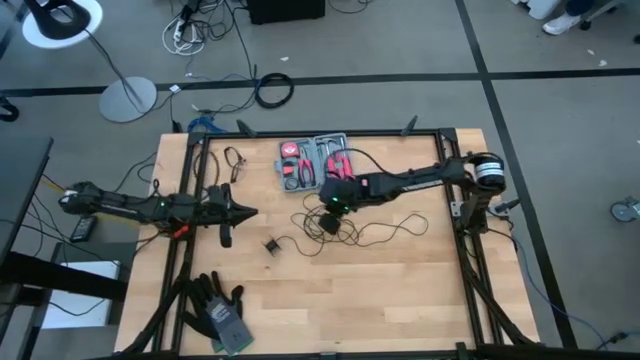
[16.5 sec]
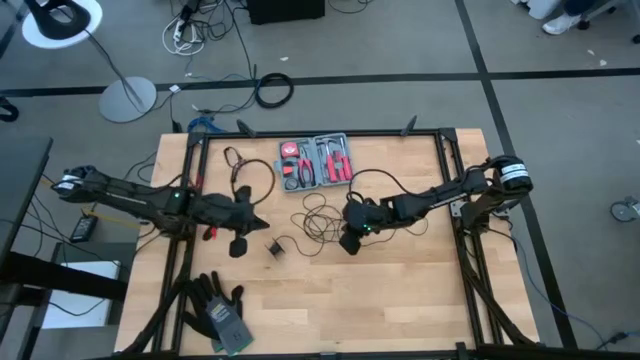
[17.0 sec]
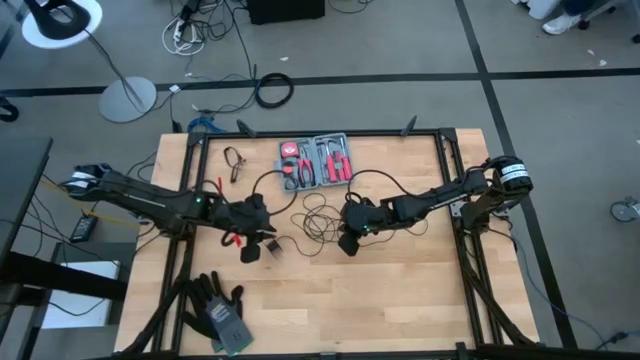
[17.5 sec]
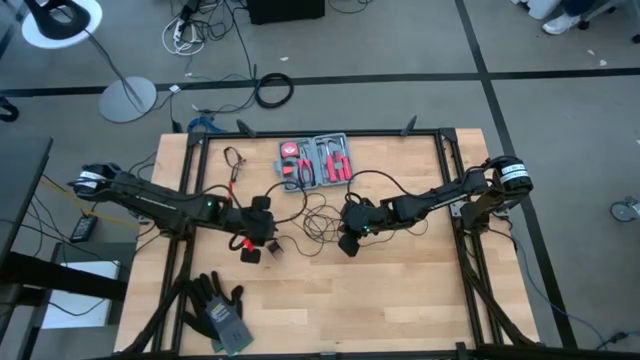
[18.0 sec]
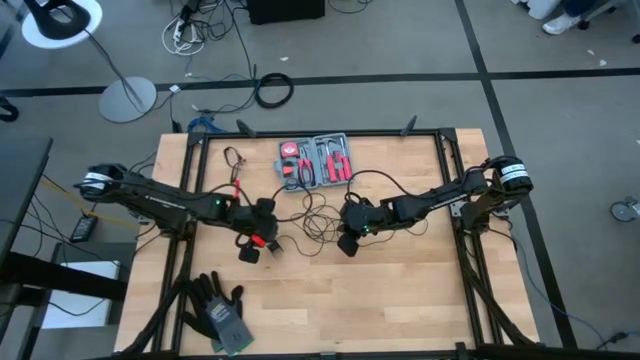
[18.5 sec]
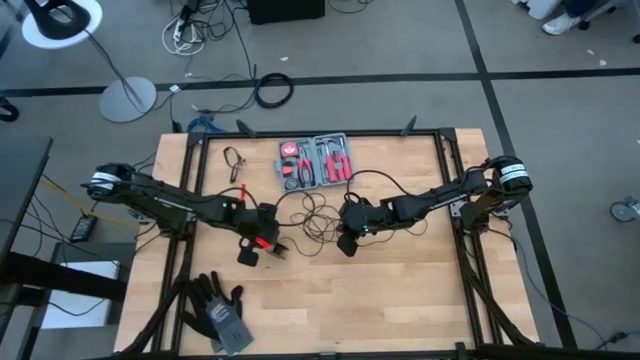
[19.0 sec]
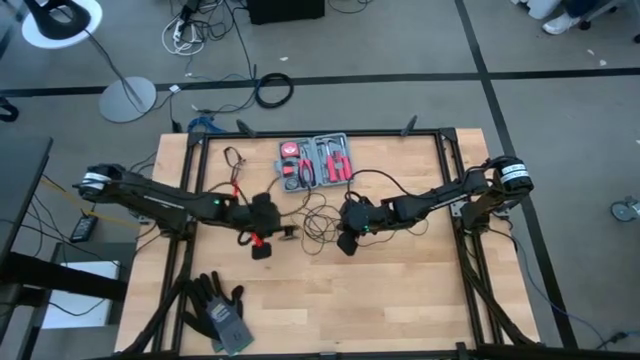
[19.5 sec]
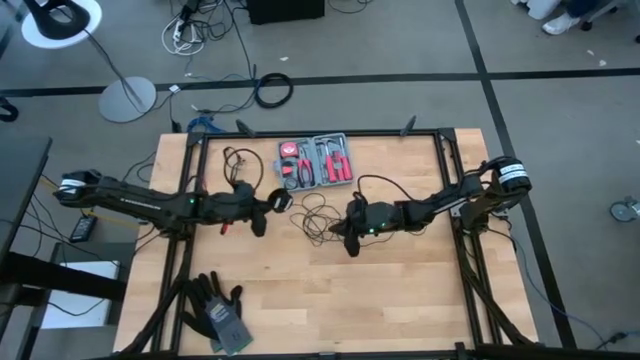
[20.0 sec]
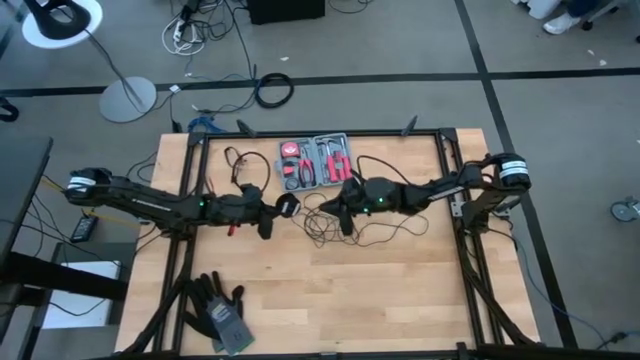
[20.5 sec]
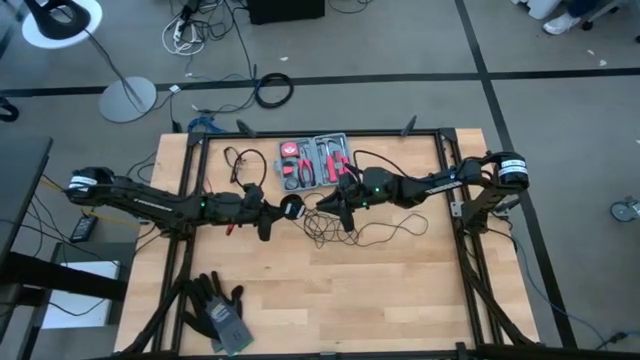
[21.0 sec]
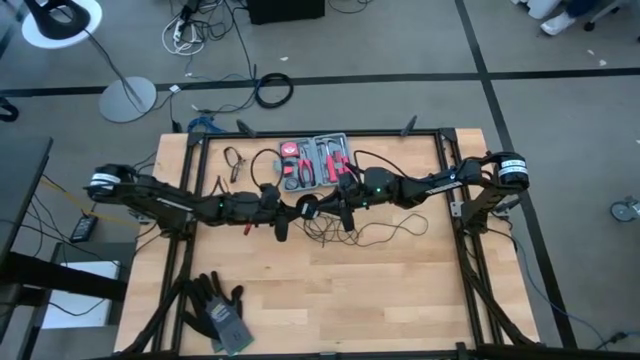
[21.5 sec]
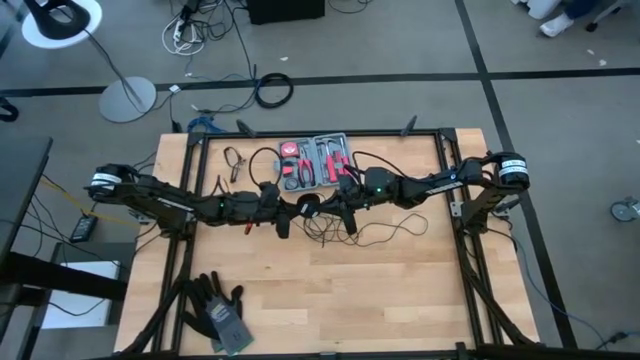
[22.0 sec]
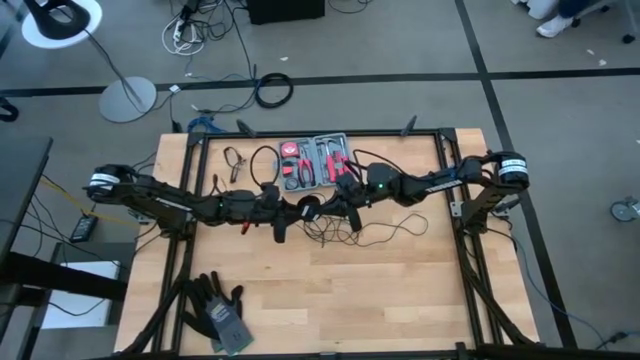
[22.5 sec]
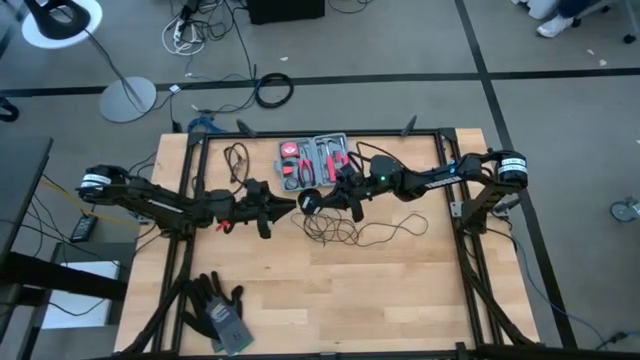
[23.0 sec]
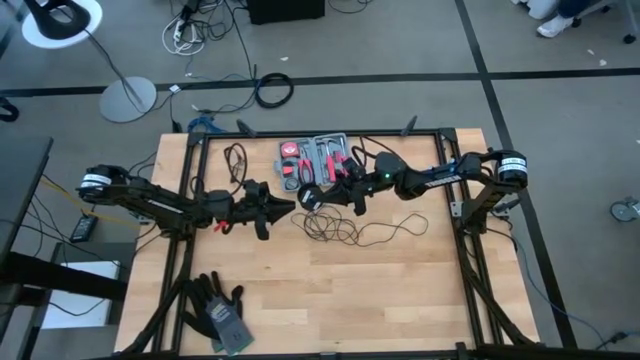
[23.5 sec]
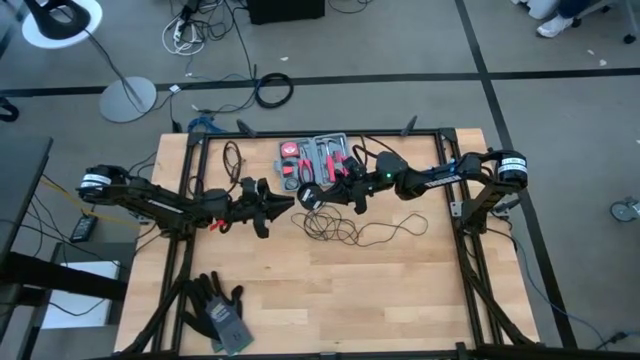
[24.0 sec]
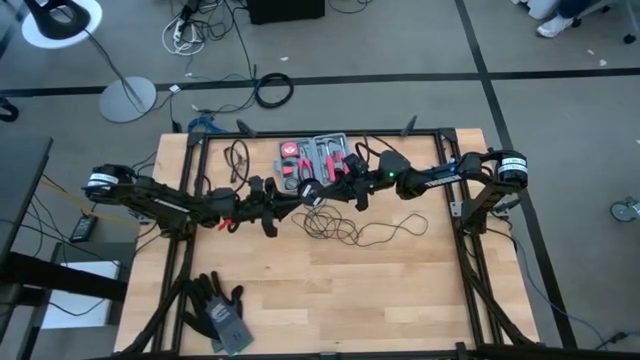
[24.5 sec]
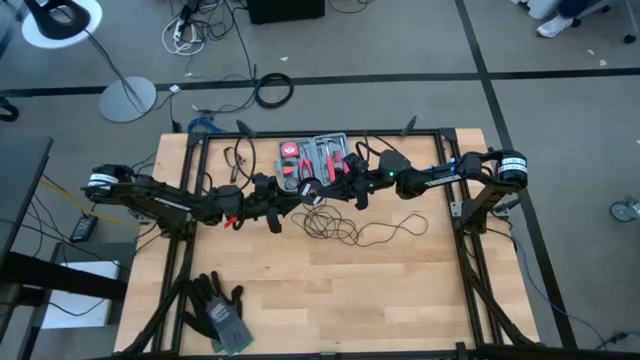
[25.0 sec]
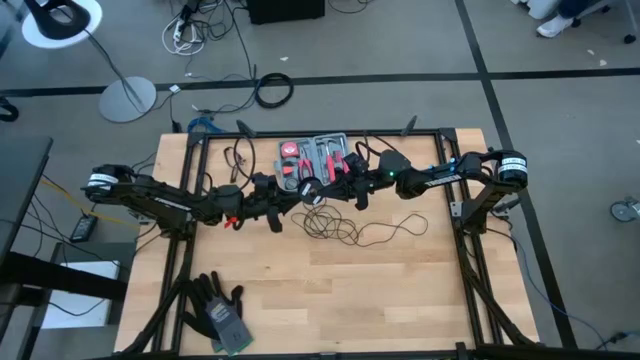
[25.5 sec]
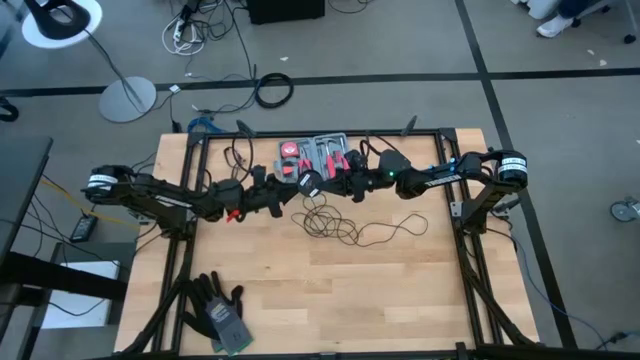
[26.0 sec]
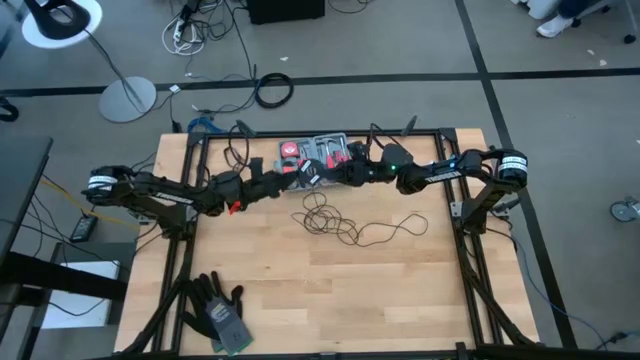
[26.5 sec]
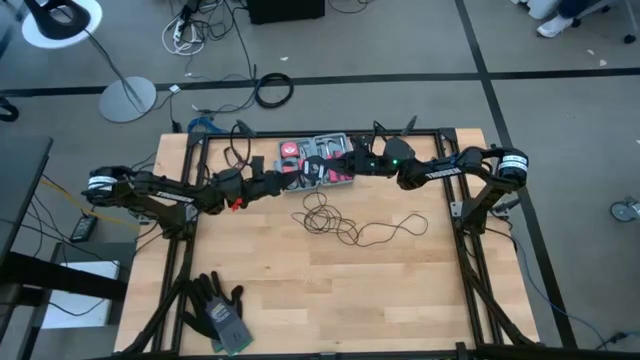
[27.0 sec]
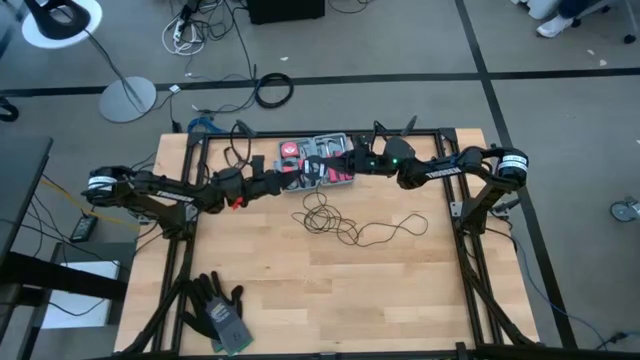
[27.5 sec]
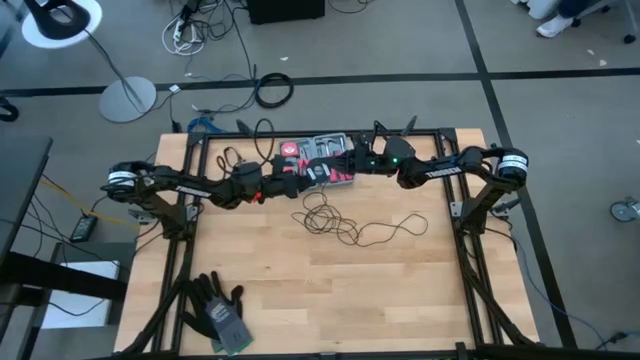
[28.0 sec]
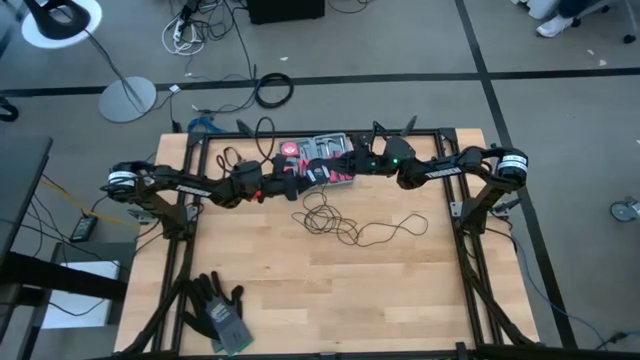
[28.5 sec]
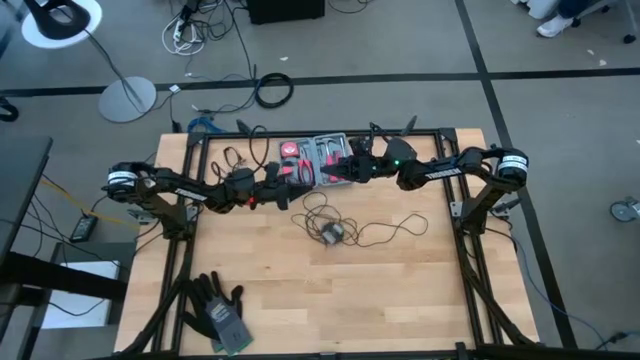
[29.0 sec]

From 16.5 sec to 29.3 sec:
Task: Coil cords
Coil the black wire onto the black spool

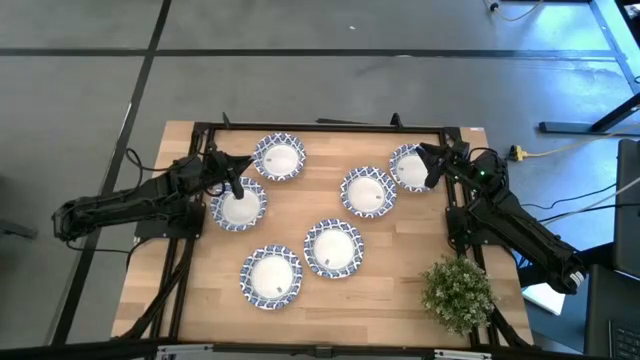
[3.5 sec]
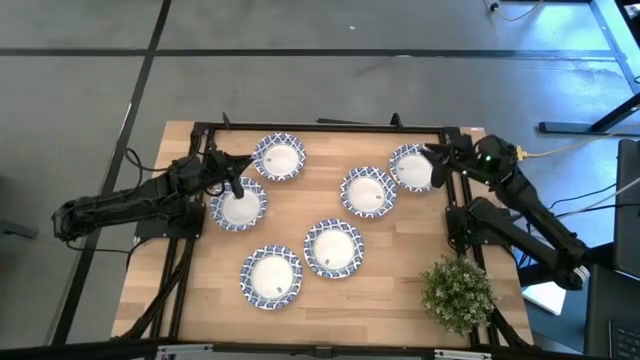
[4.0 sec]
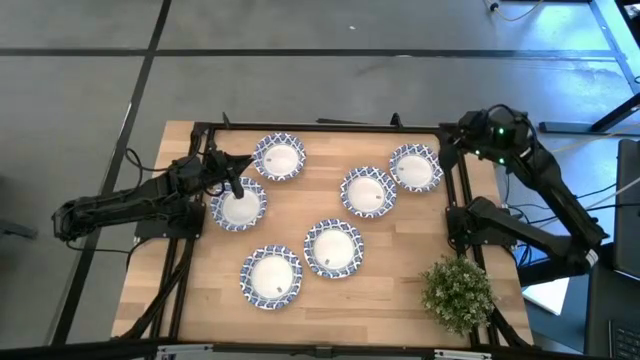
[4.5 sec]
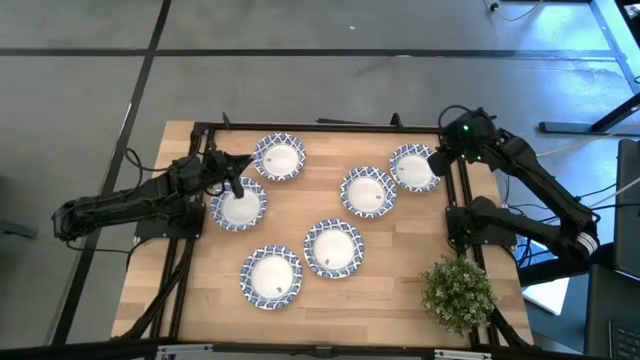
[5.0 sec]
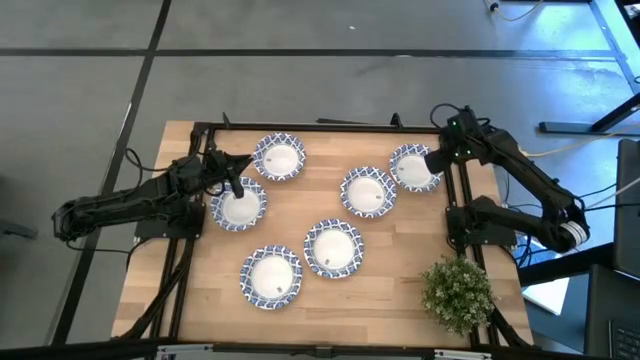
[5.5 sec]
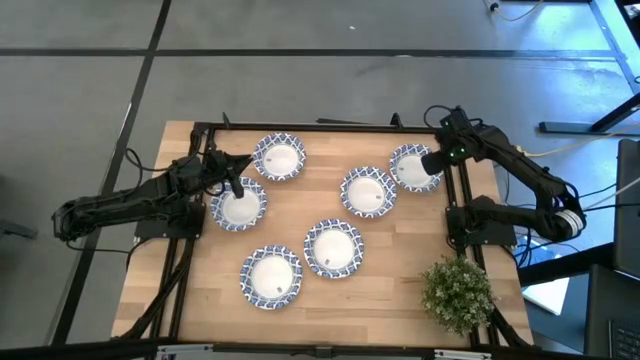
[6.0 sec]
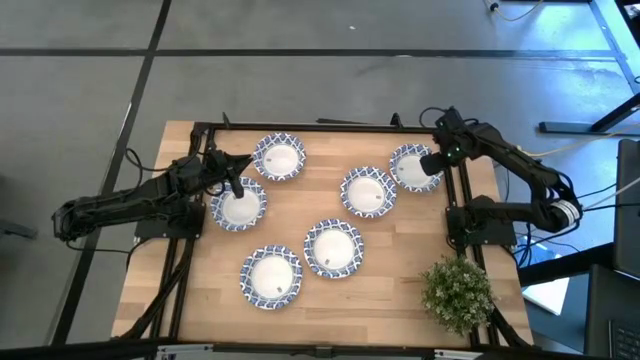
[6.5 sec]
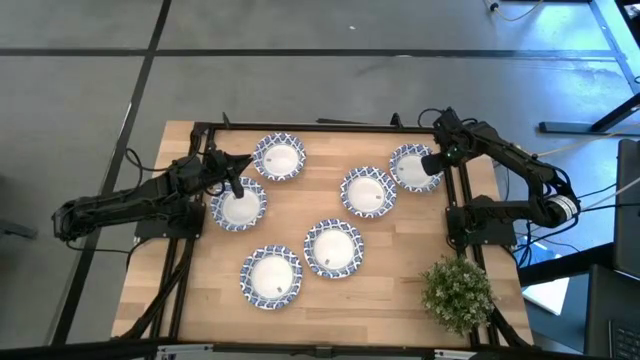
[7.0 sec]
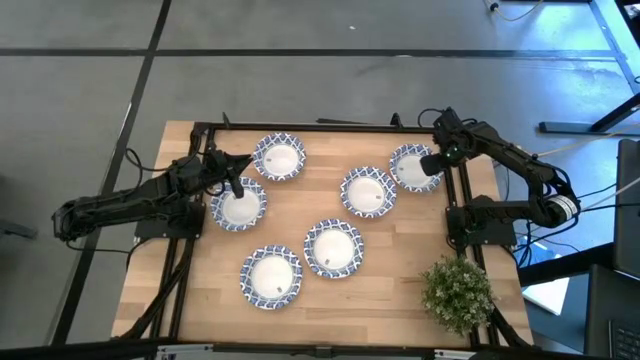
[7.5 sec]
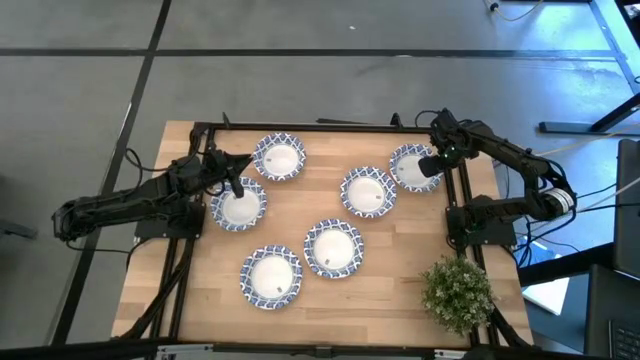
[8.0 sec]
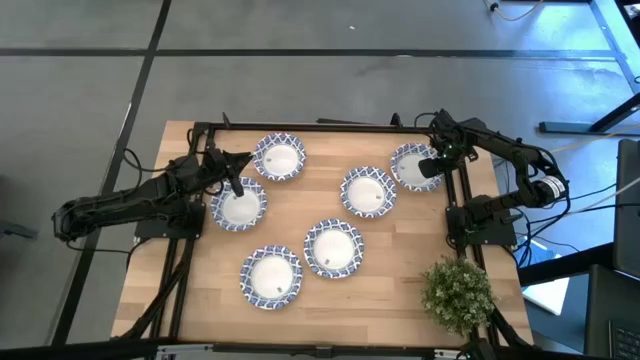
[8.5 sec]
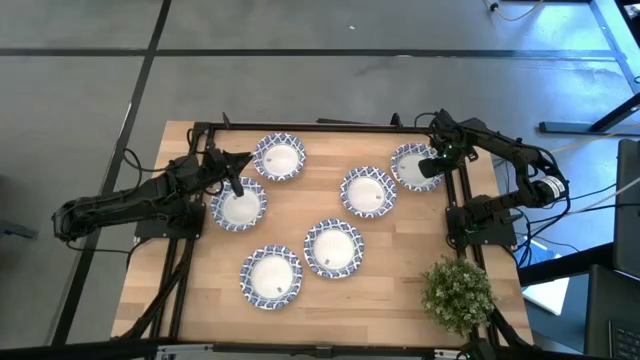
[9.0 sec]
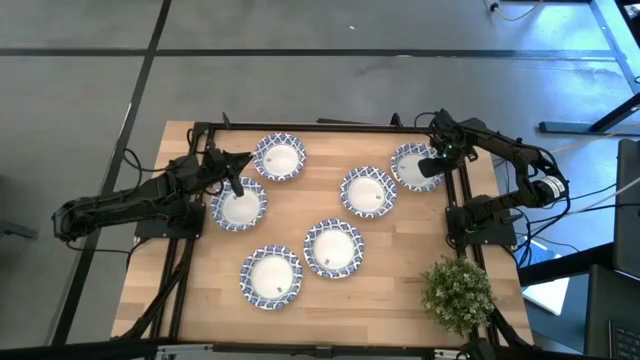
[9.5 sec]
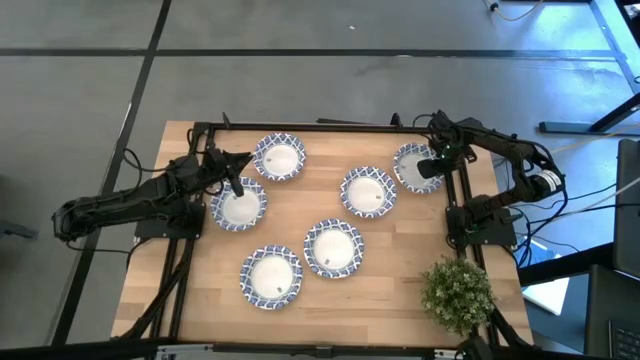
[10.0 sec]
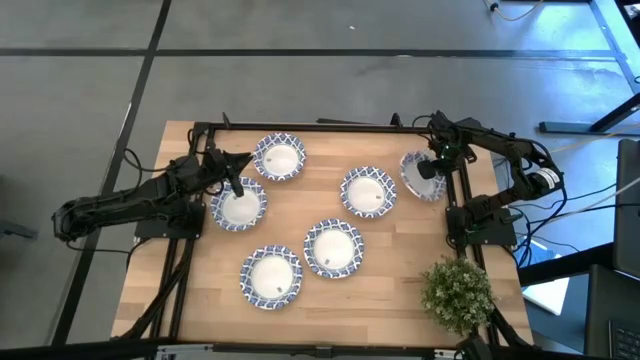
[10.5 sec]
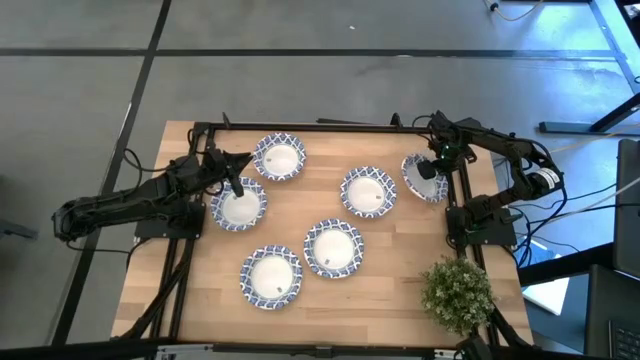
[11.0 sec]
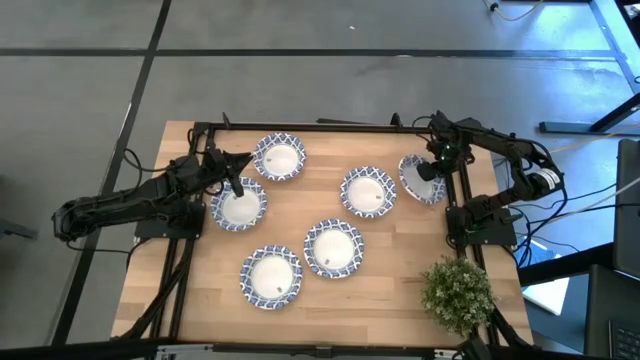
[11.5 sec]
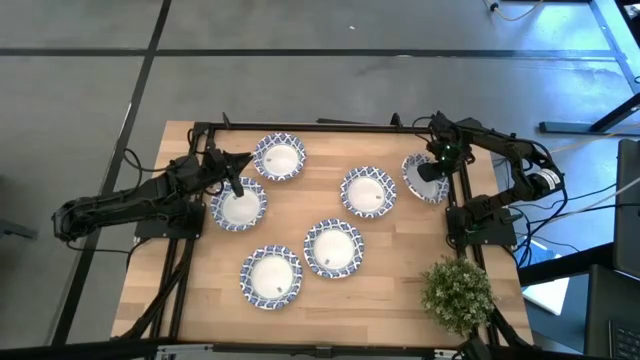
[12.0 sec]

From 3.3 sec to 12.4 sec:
Task: Nest bowls inside each other
Stack the blue bowl on the blue bowl
